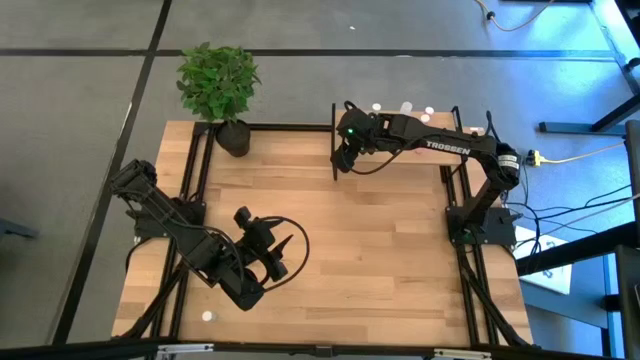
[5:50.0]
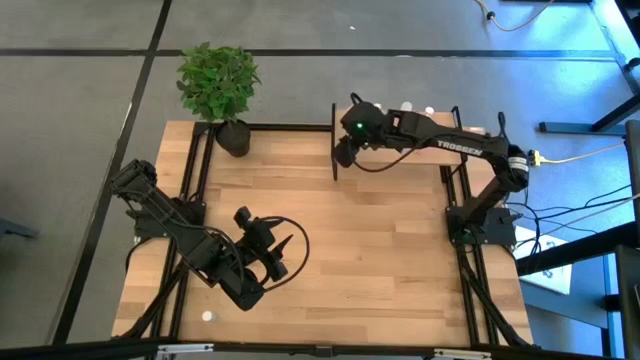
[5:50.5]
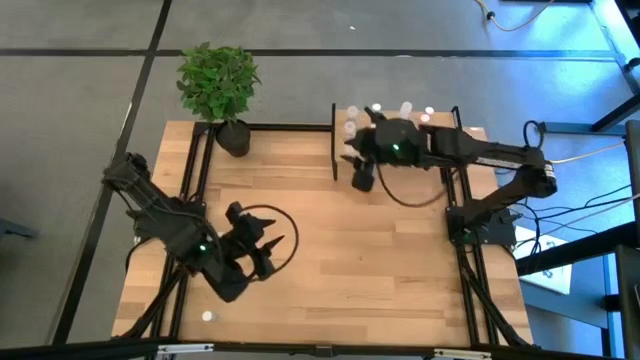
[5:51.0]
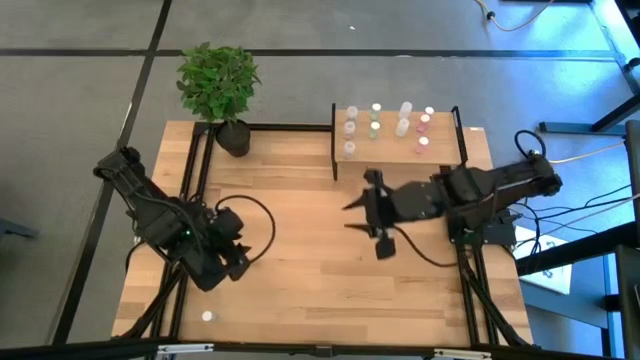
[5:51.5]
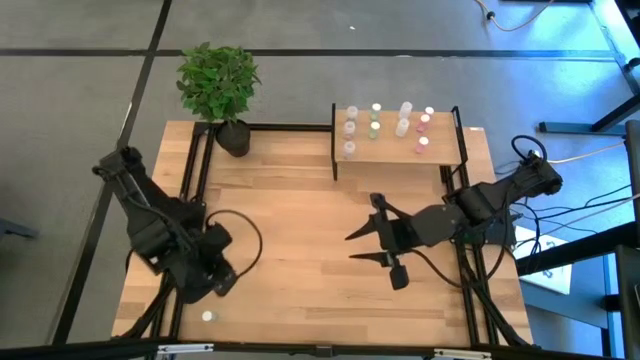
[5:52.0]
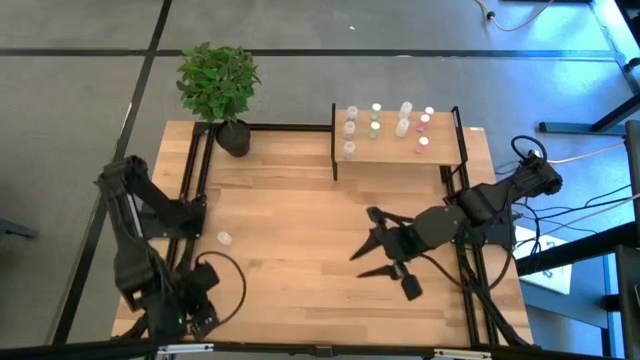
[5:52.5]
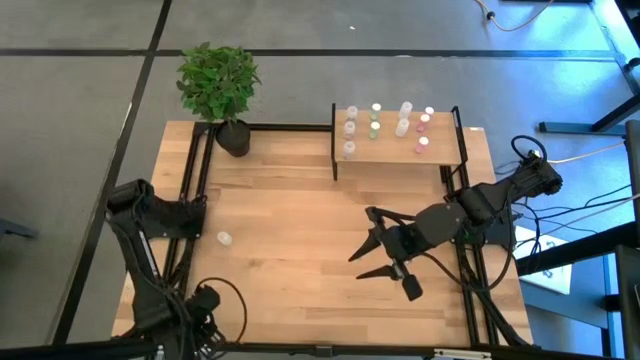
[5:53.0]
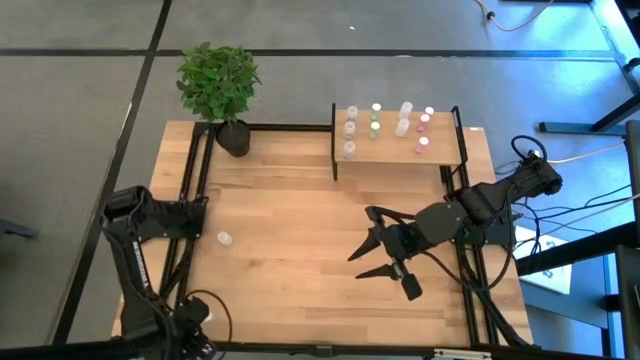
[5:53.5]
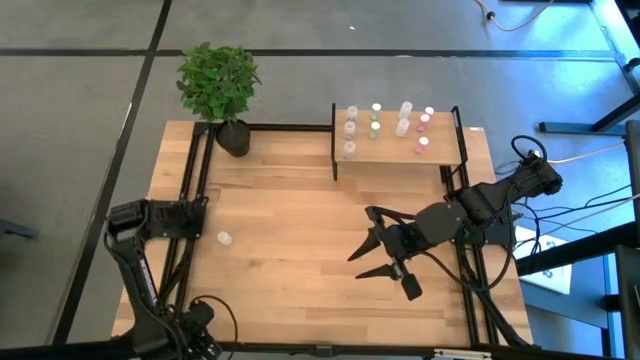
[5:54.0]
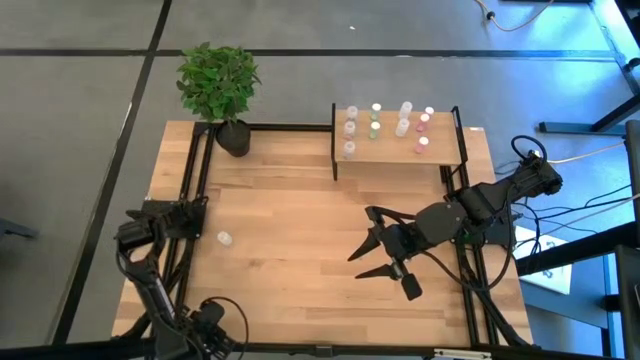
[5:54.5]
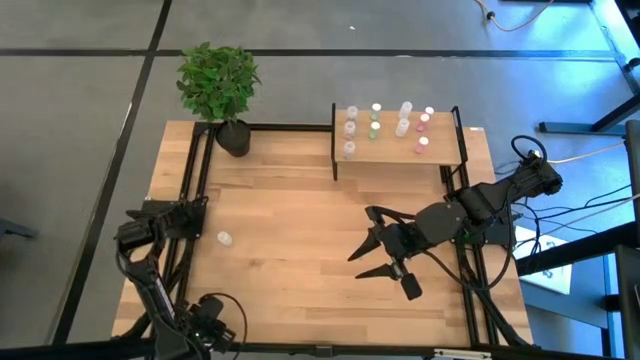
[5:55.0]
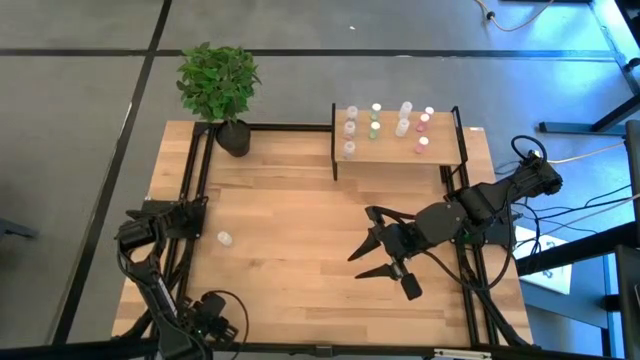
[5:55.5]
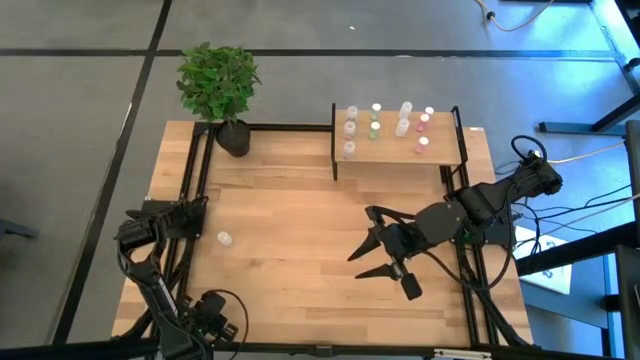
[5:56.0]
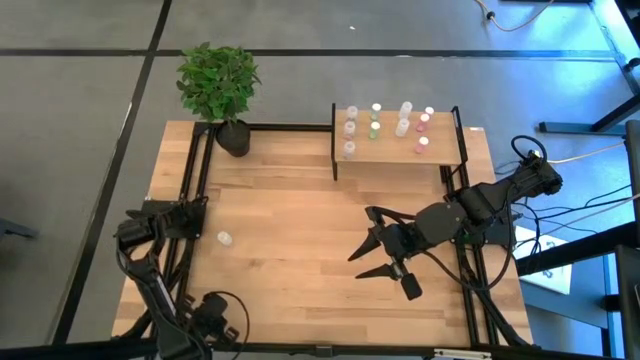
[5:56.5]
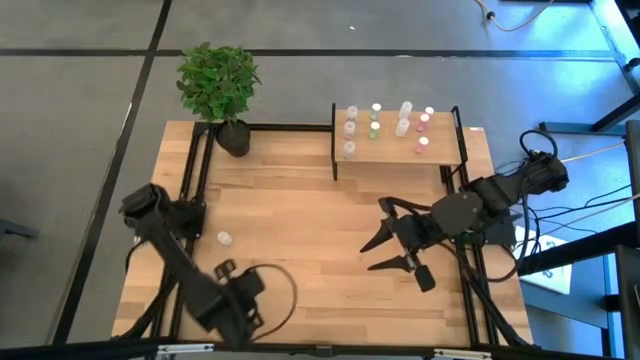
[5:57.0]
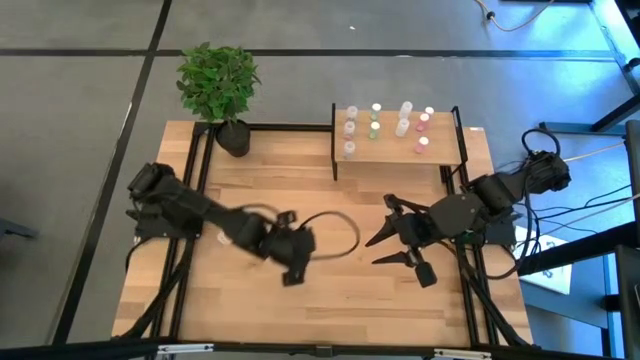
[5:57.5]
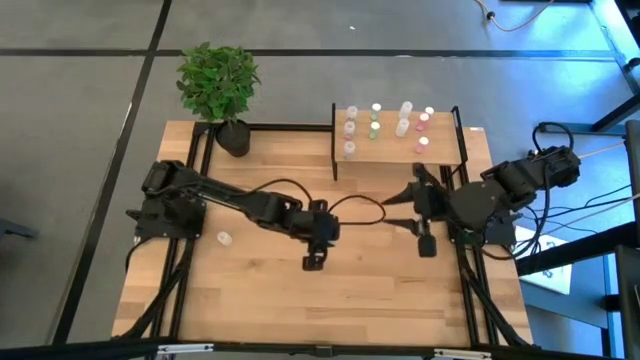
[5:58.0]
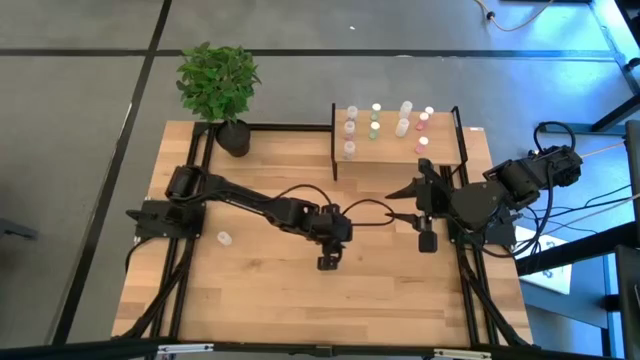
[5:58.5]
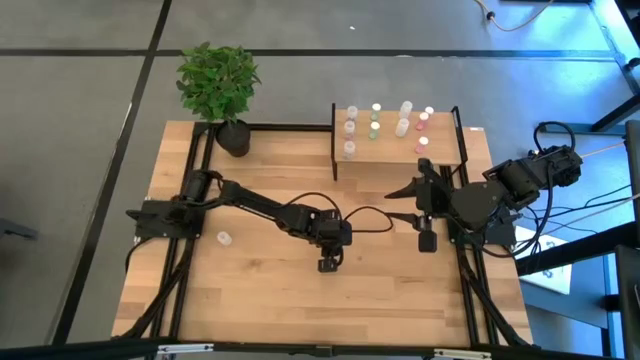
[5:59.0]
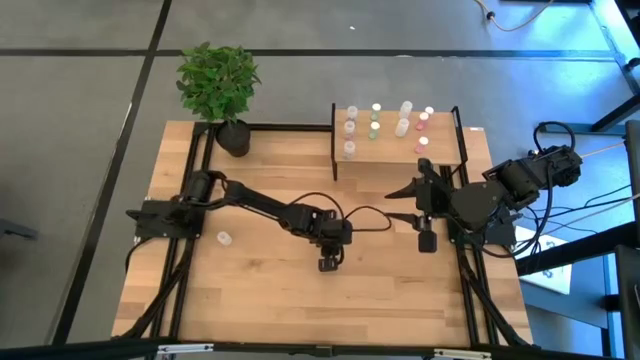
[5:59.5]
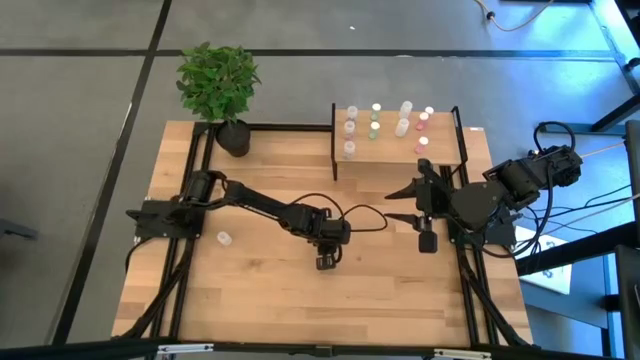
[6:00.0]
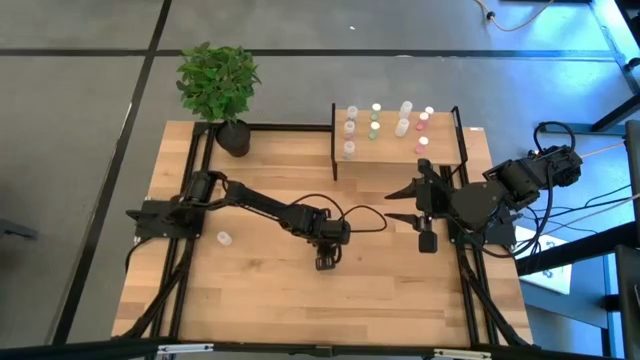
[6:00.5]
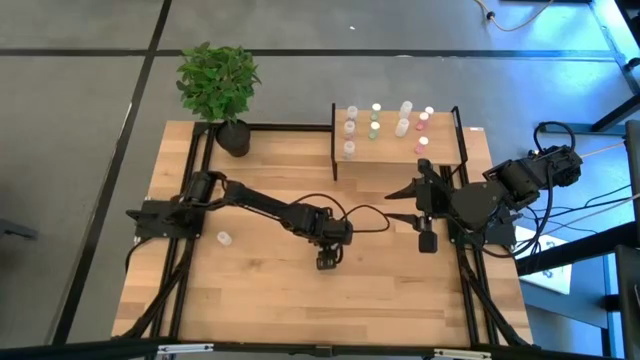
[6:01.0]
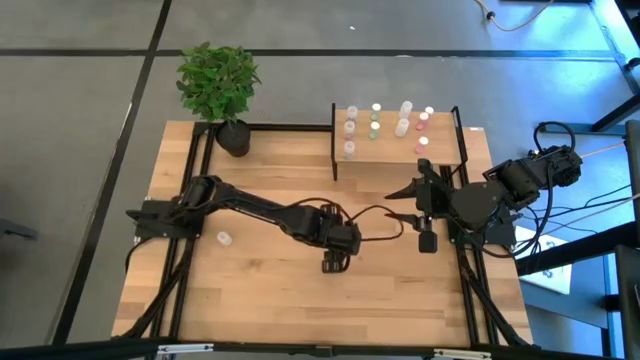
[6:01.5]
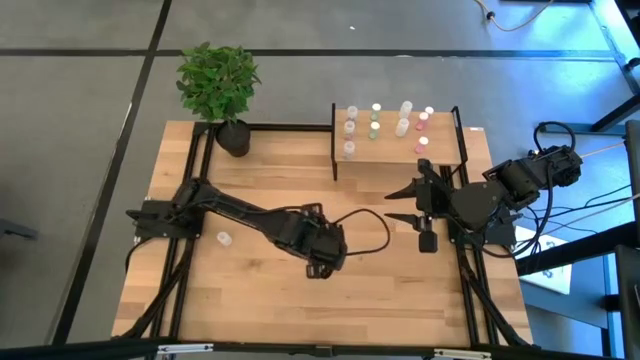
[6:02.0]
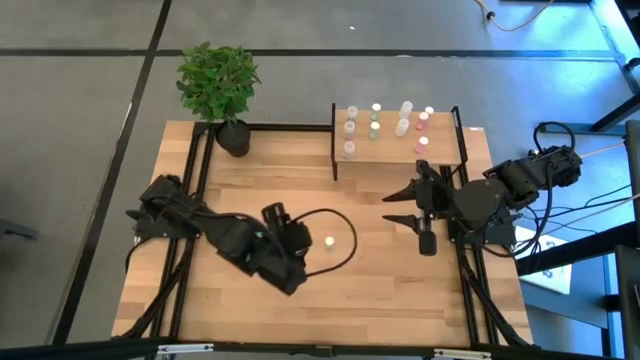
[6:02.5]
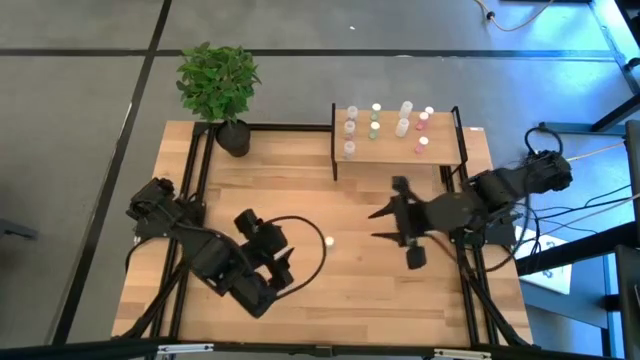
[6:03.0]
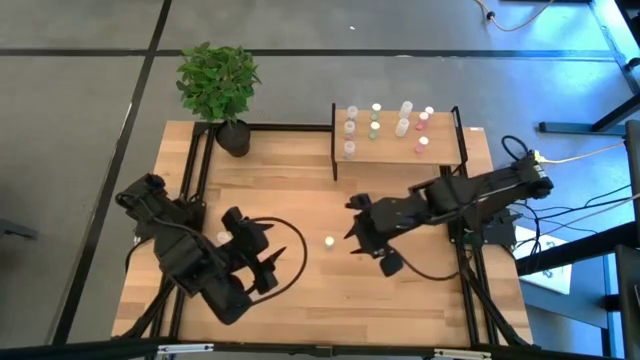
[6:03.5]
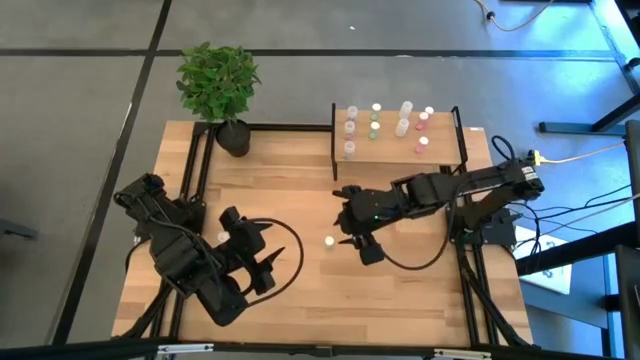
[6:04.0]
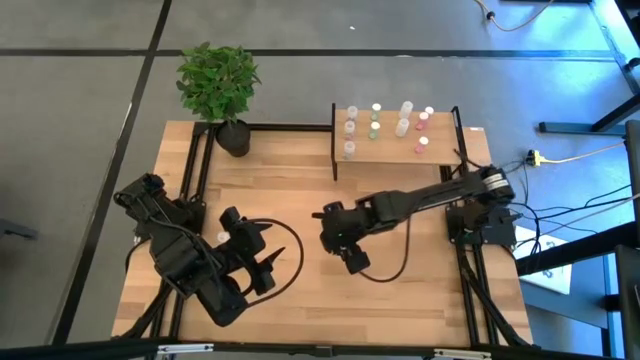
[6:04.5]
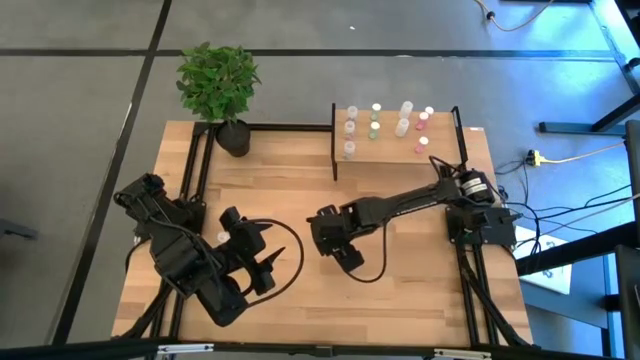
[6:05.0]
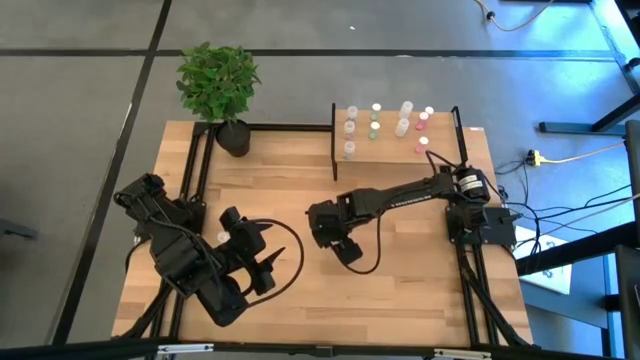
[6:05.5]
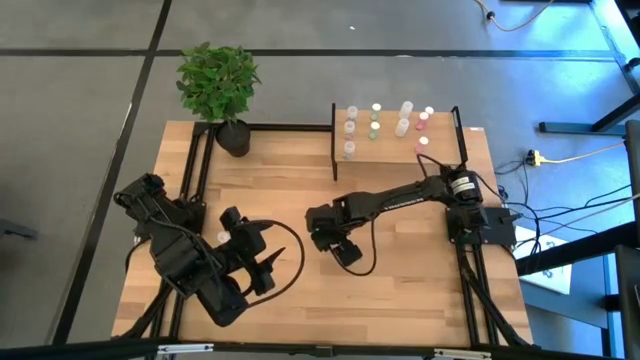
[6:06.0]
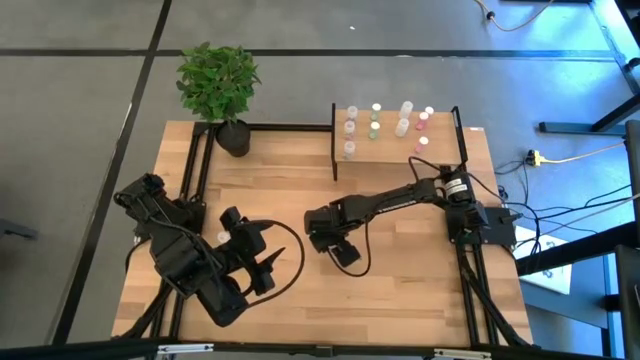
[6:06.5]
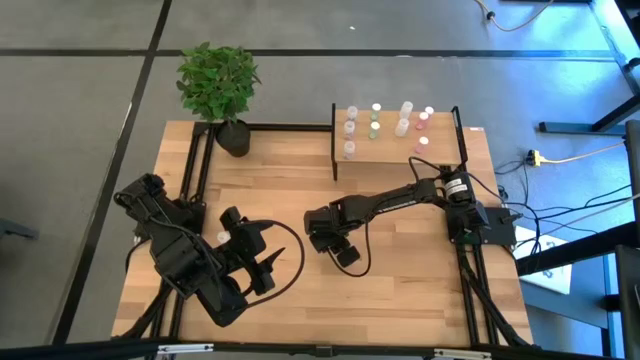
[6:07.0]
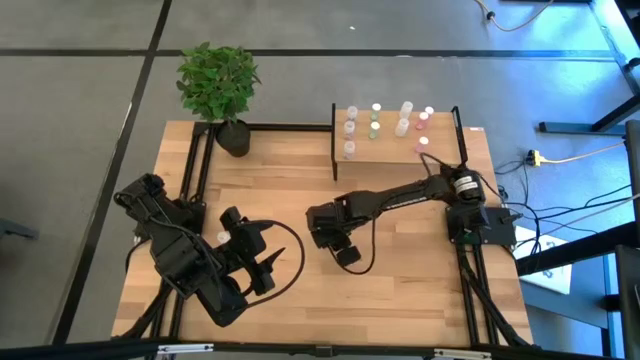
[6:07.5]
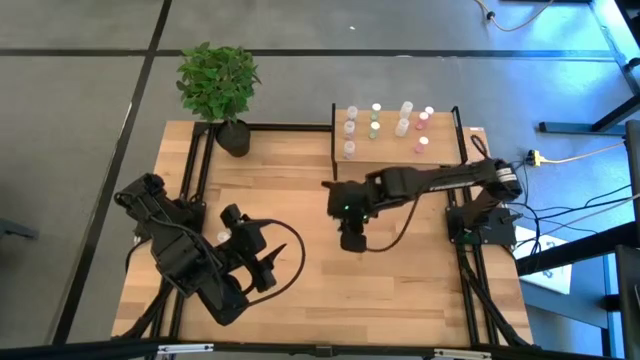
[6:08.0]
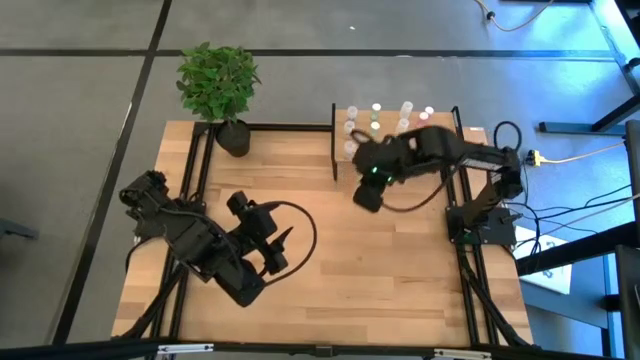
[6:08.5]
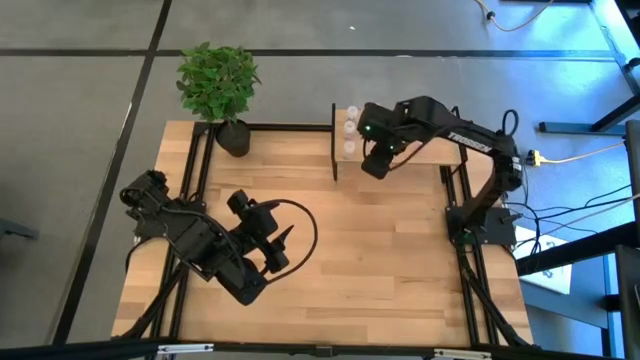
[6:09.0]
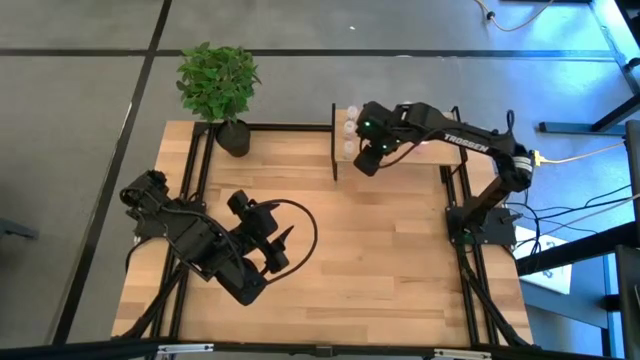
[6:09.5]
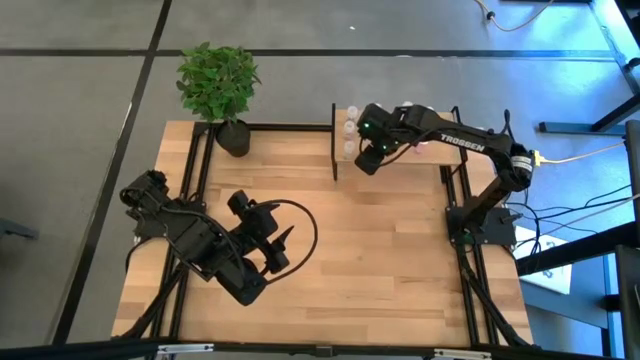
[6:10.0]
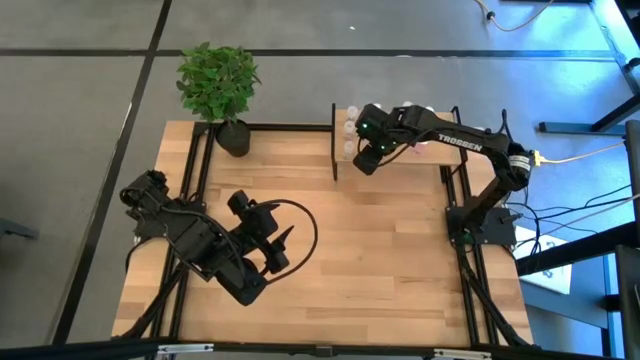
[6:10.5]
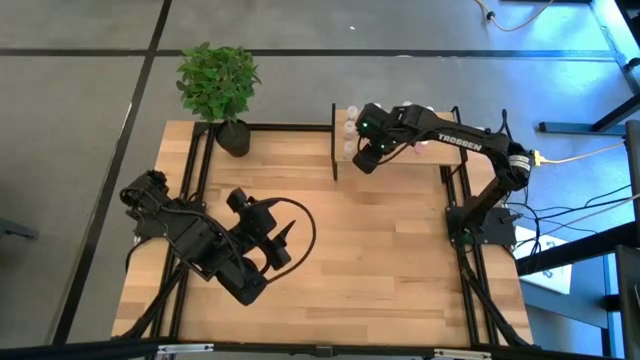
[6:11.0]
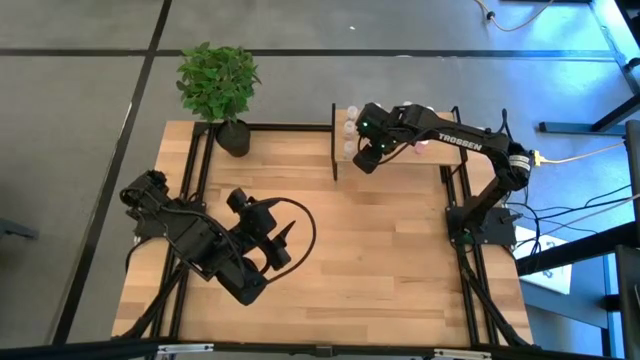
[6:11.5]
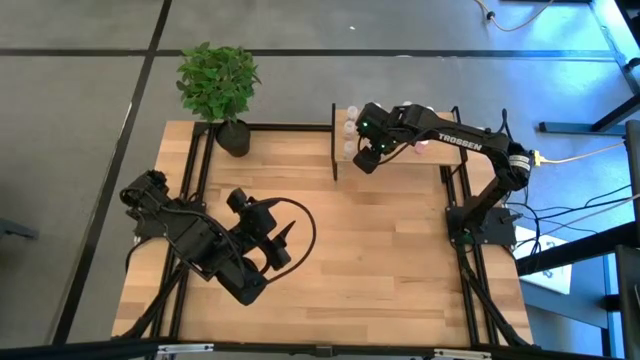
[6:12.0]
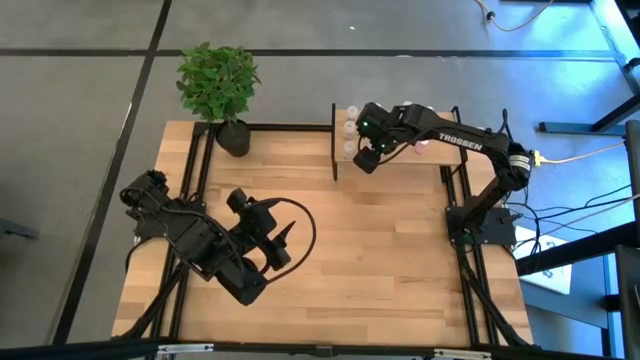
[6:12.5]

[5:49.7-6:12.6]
Task: Pick and place medicine bottles onto shelf by color
Put the green pill bottle aligned with the other green pill bottles on the shelf
